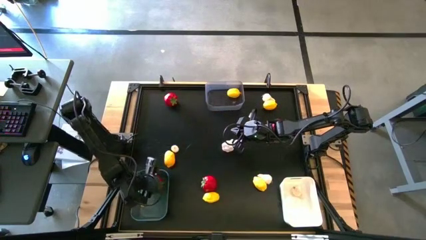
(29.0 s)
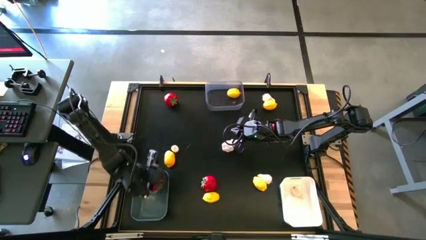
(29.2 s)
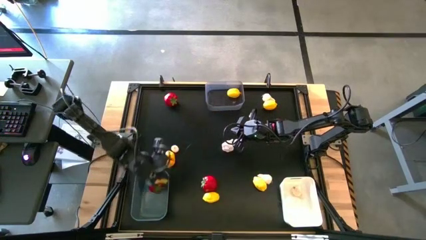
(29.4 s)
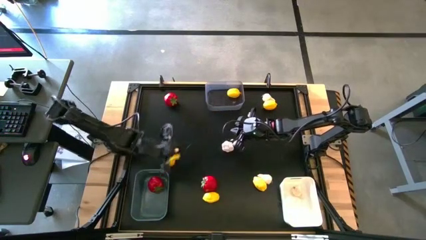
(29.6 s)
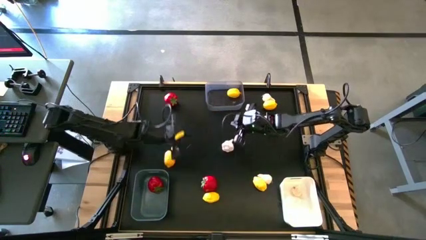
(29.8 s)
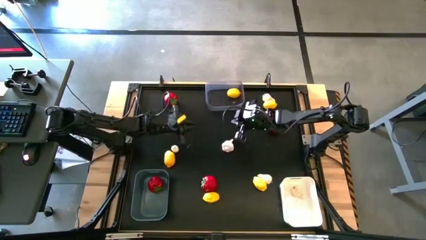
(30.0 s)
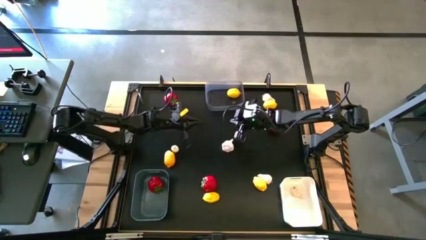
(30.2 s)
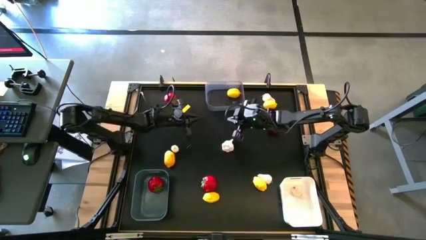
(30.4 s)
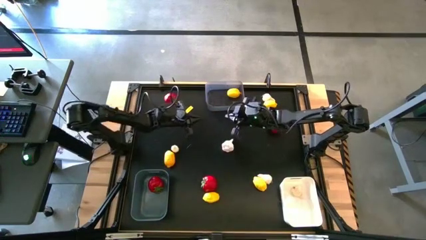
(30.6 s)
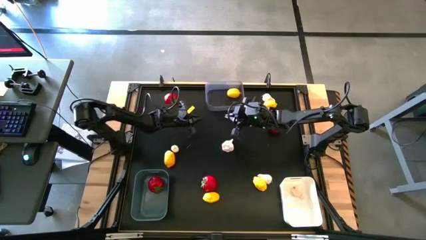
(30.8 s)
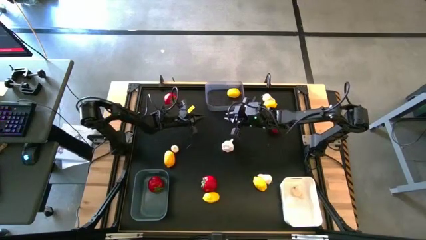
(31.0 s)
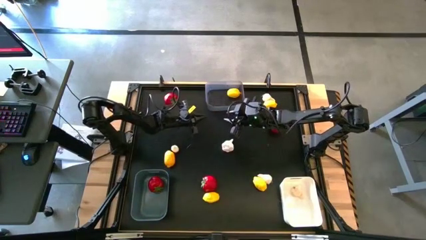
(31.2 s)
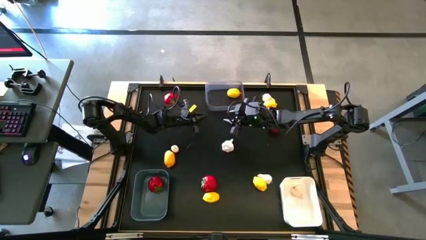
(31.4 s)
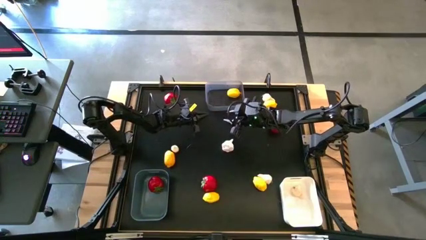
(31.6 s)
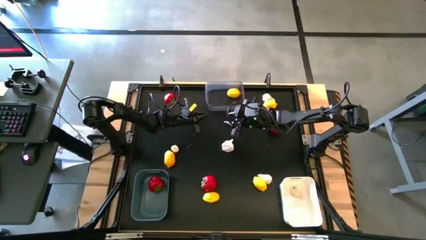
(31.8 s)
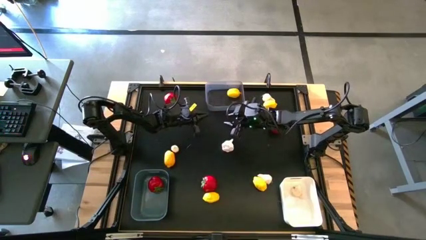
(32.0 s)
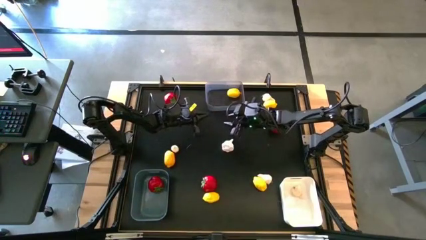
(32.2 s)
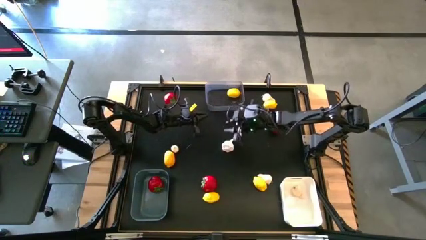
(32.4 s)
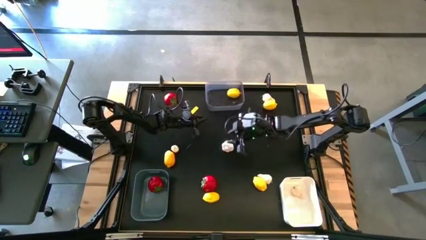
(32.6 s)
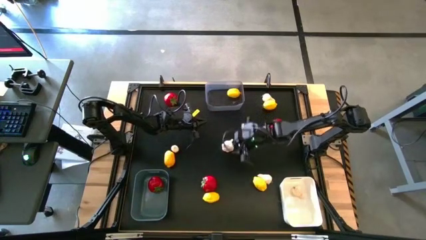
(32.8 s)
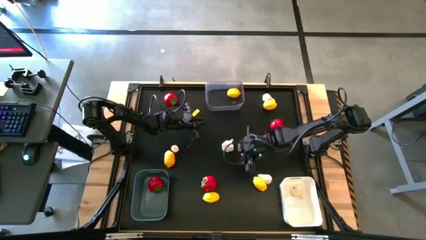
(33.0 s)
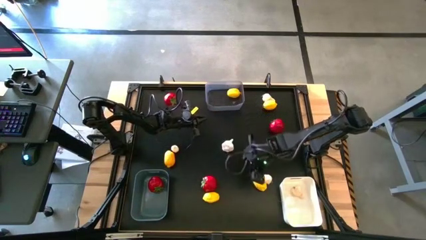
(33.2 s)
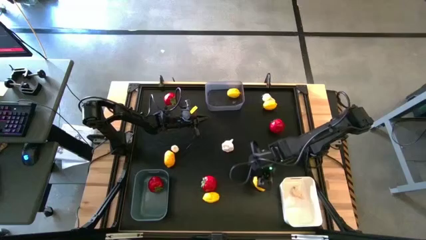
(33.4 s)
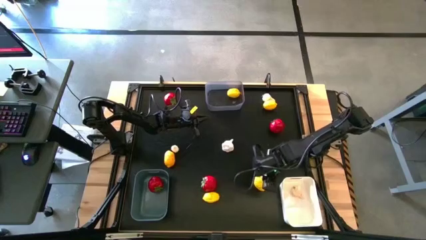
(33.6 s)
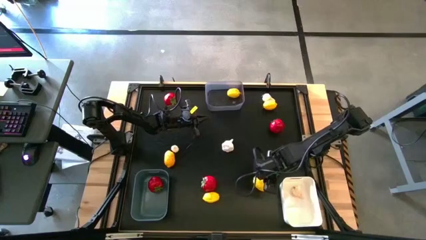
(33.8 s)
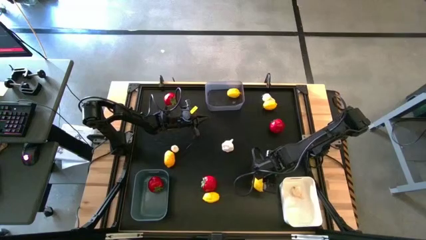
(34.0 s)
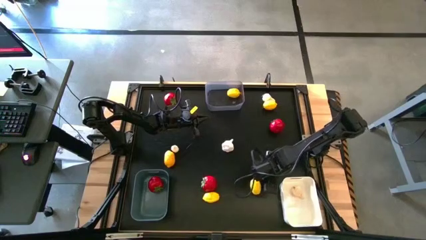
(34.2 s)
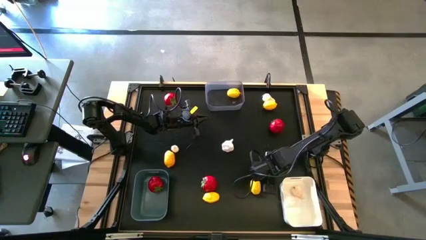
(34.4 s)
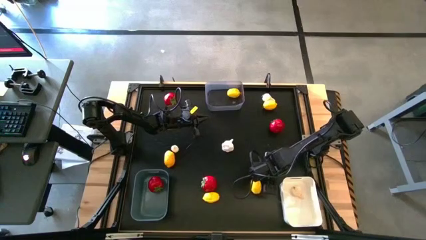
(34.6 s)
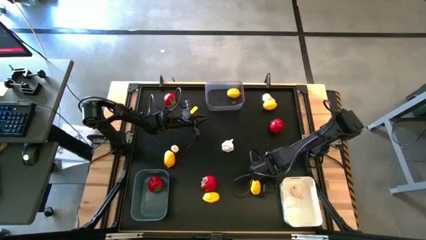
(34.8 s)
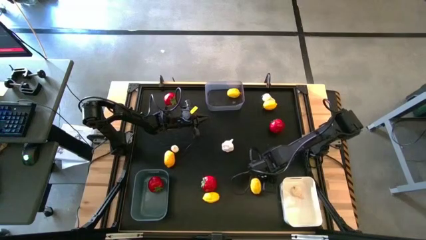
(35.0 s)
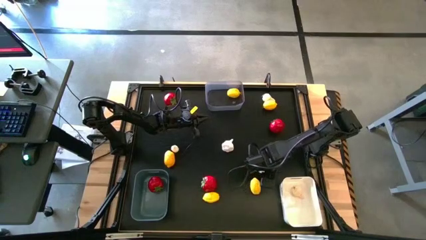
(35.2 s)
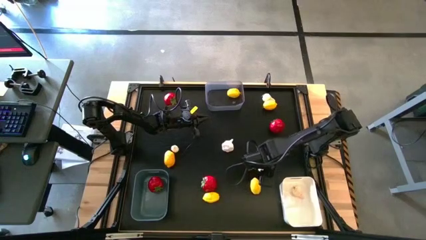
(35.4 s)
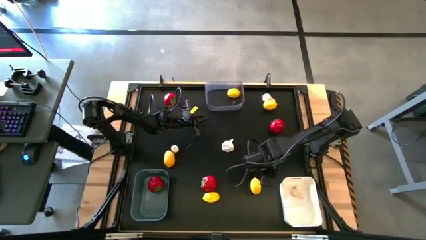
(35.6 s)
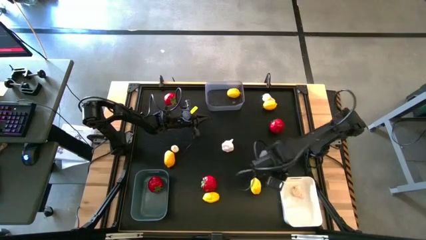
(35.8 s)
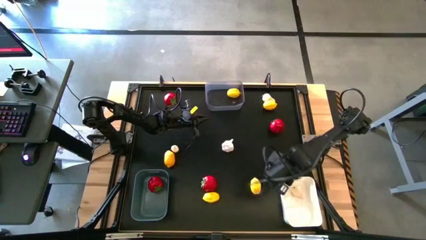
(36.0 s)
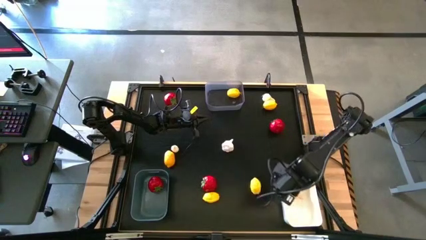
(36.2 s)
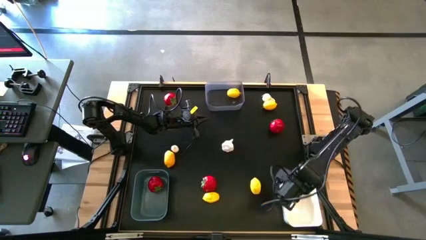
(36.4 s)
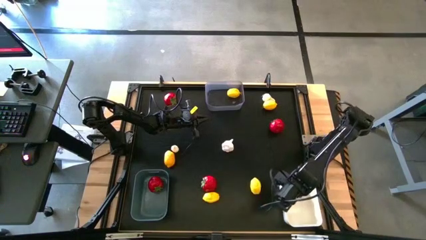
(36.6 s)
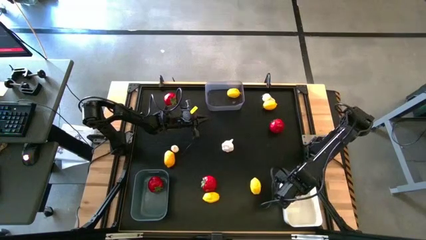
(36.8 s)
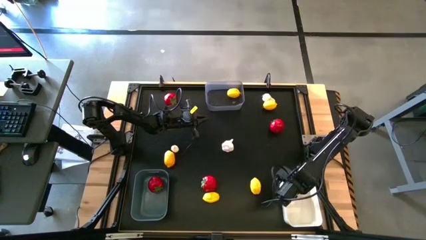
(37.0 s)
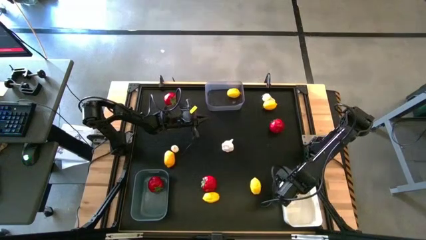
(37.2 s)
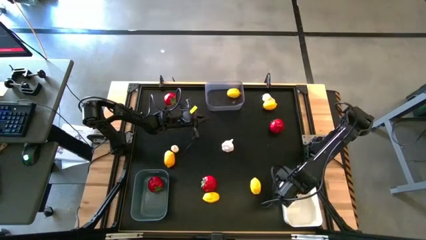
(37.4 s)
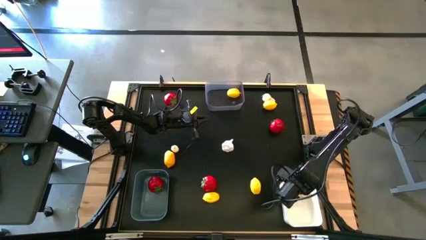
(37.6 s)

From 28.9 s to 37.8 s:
Task: Sort produce into baskets
Put the bottom right garlic into the white bin

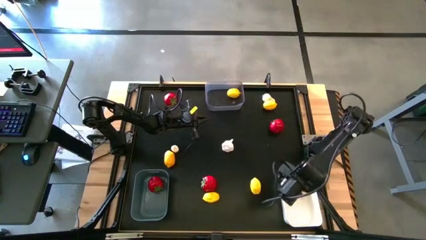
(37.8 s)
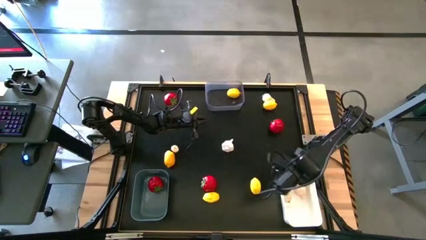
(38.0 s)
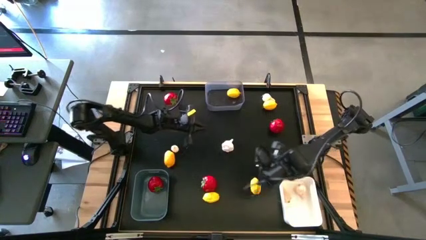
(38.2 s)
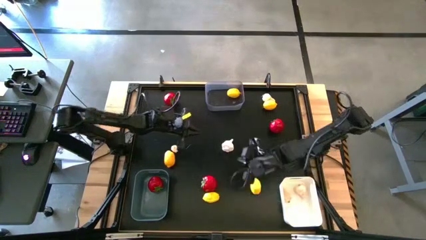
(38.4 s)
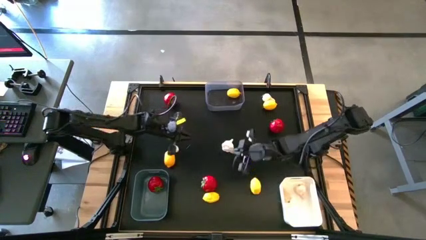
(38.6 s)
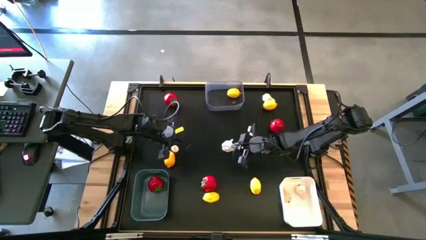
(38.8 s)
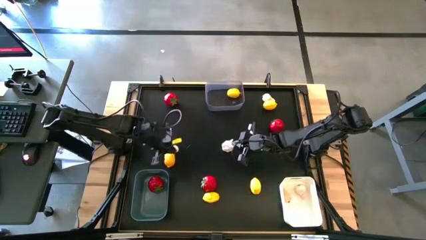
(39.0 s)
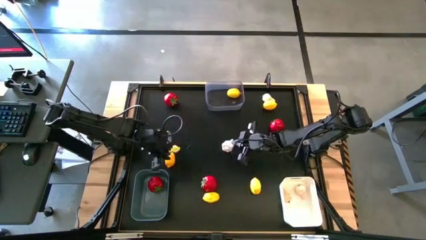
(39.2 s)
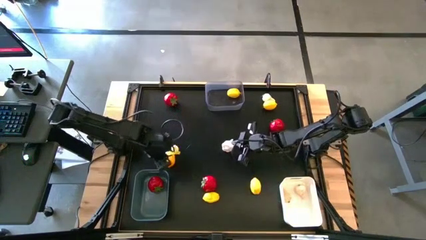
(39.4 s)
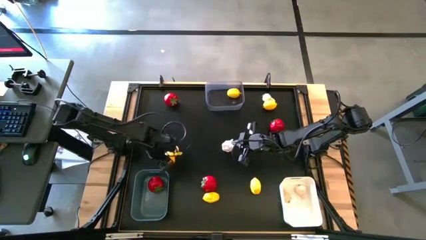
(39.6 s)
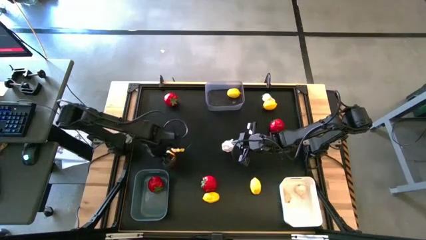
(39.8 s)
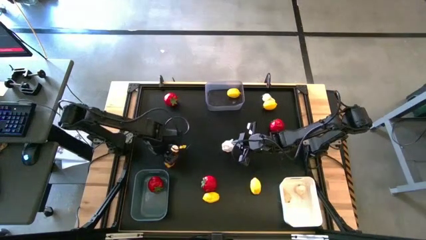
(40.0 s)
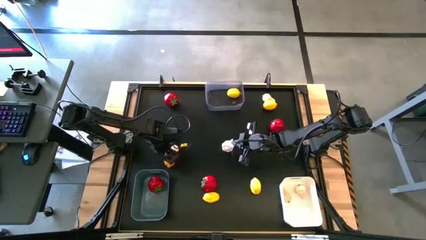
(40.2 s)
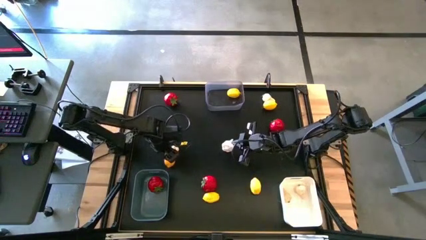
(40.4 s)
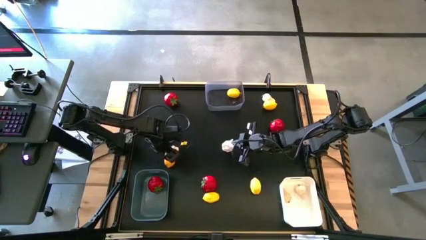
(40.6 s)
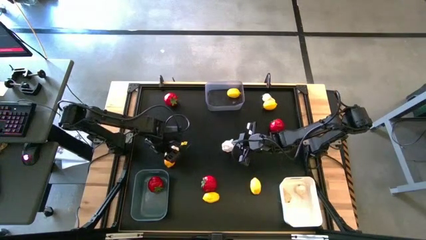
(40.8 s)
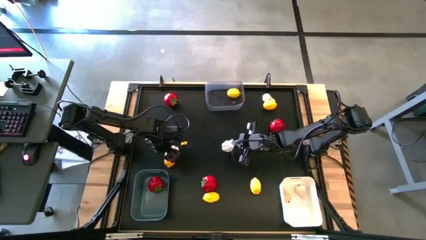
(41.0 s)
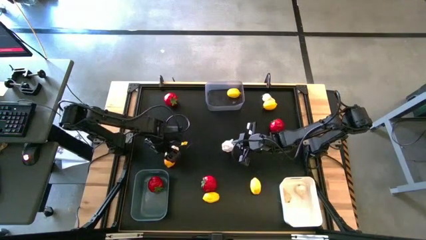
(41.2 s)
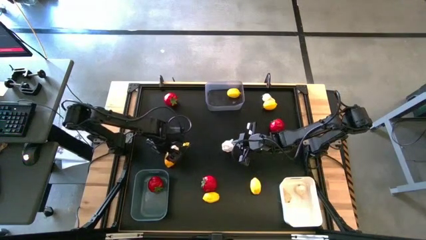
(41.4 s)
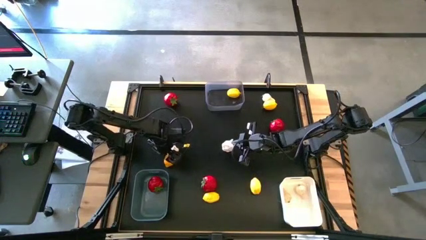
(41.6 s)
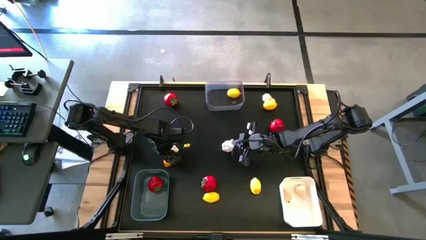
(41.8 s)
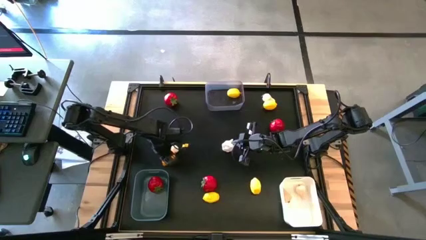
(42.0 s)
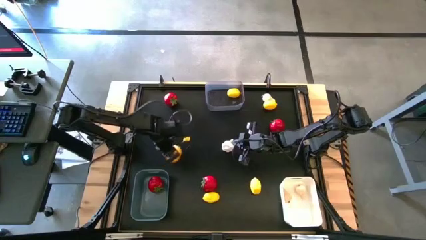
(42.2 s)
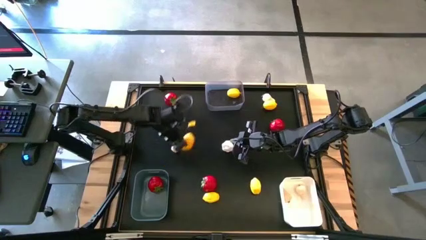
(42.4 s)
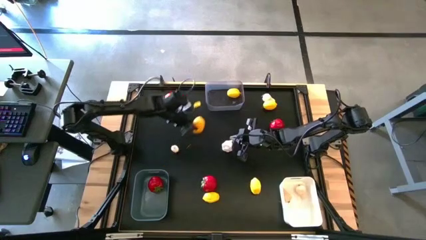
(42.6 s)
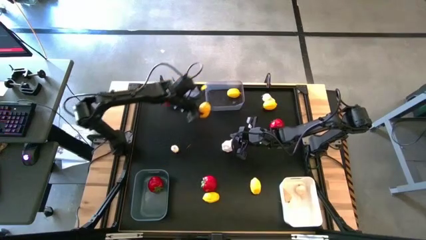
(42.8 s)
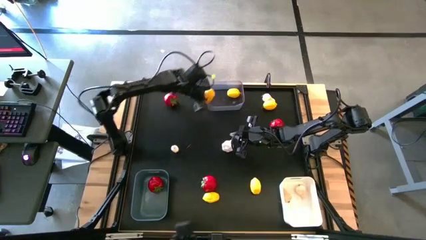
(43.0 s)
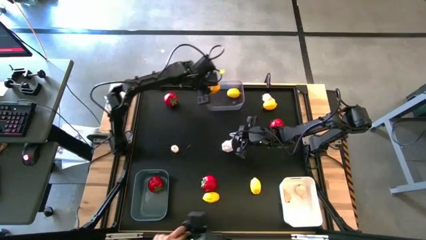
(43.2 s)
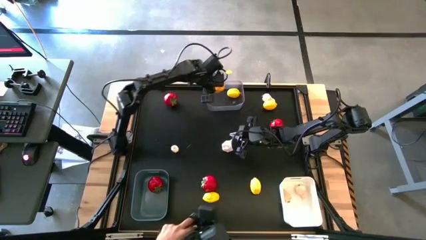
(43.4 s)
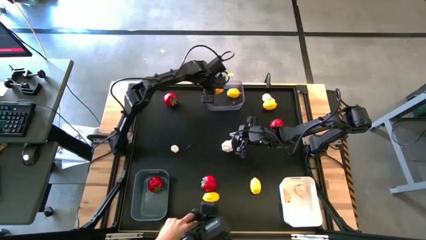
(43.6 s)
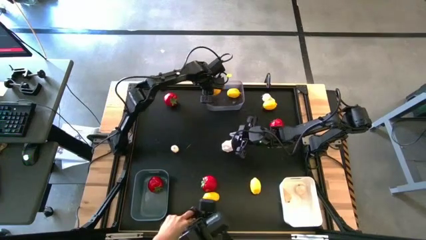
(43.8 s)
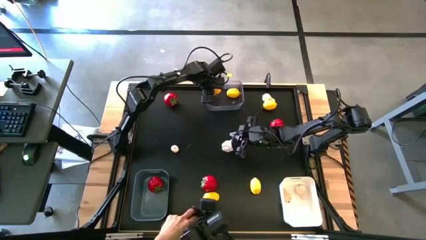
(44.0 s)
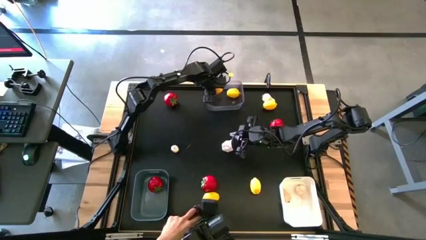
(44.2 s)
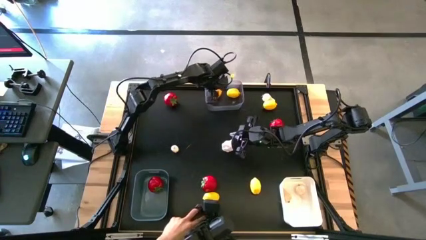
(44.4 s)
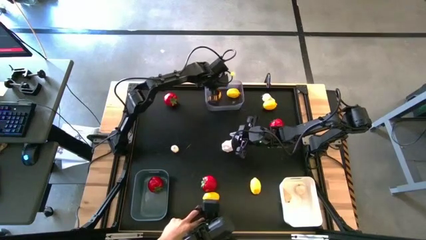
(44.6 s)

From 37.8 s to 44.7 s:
Put the left lemon into the transparent bin
